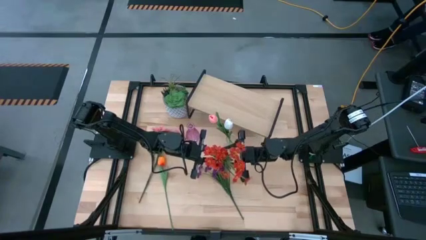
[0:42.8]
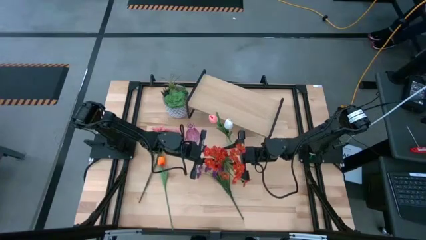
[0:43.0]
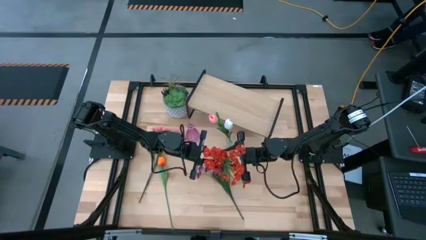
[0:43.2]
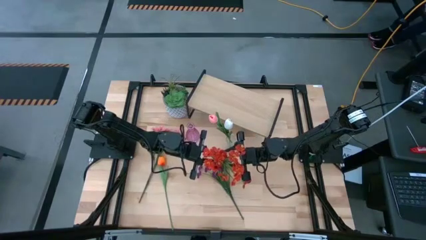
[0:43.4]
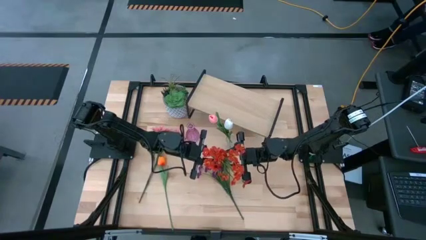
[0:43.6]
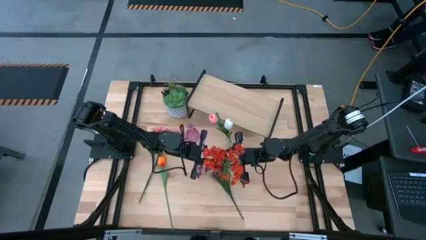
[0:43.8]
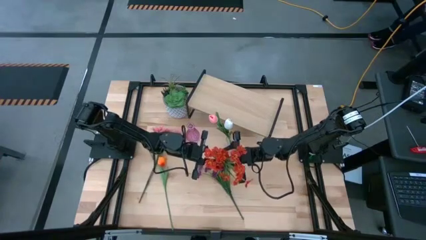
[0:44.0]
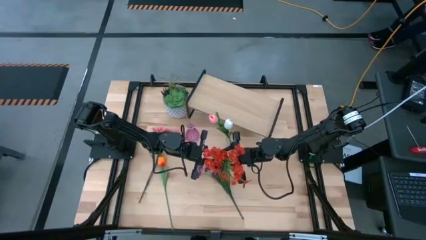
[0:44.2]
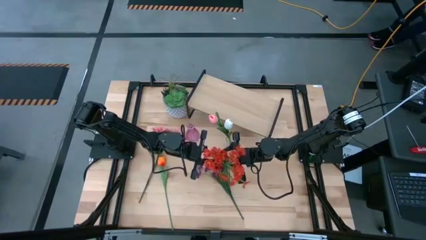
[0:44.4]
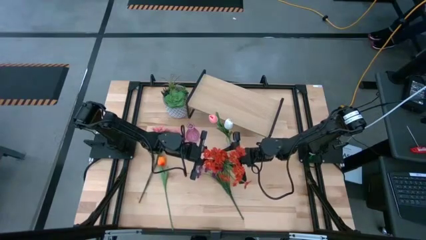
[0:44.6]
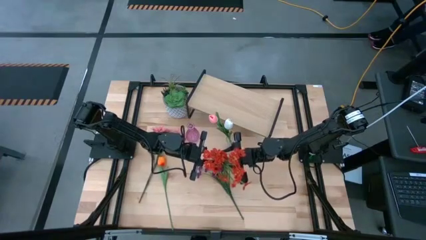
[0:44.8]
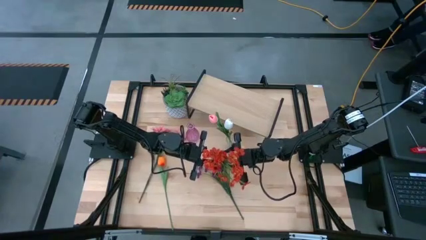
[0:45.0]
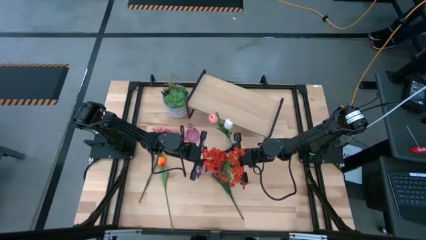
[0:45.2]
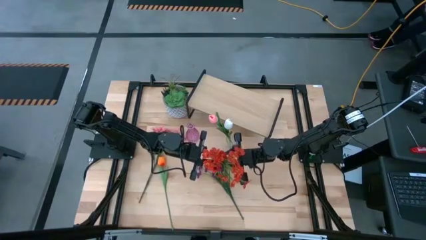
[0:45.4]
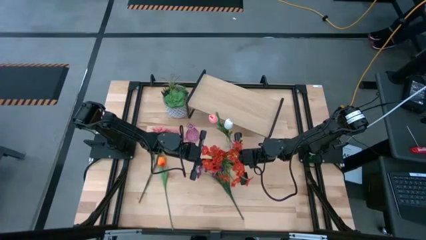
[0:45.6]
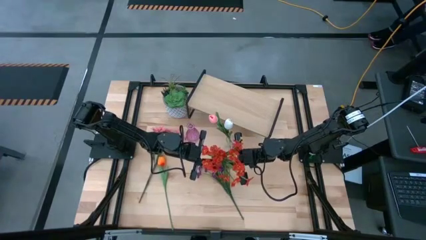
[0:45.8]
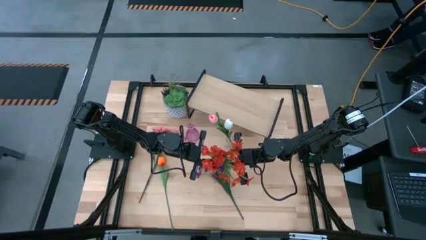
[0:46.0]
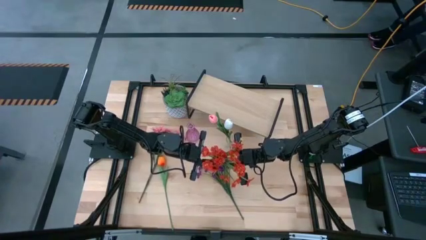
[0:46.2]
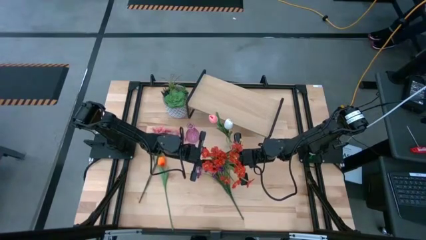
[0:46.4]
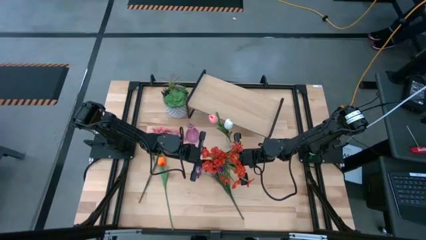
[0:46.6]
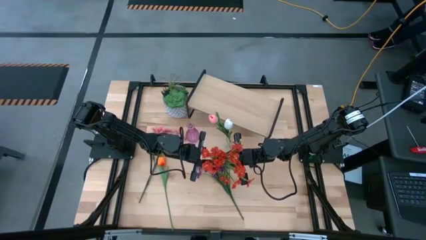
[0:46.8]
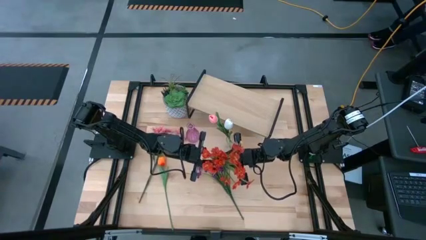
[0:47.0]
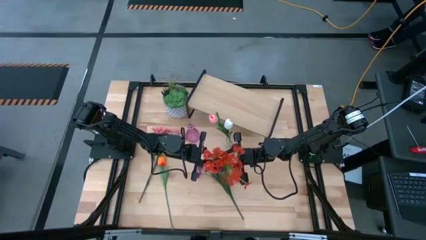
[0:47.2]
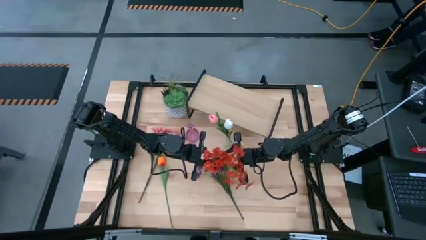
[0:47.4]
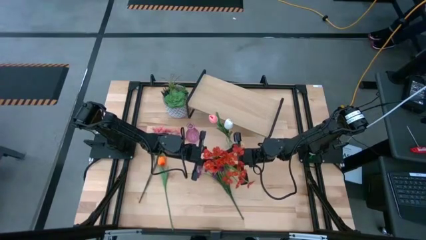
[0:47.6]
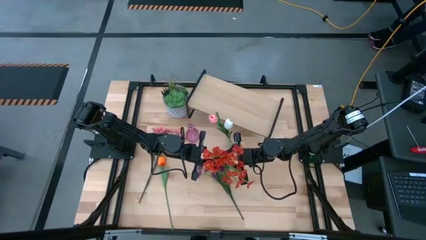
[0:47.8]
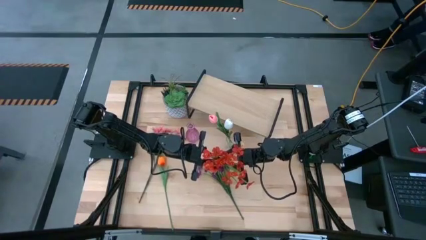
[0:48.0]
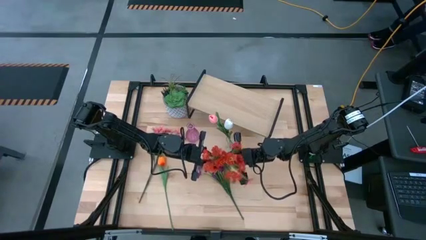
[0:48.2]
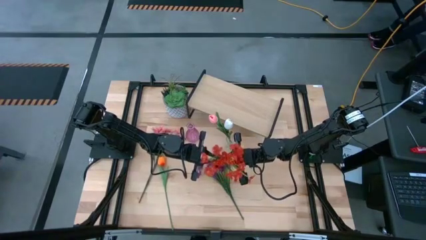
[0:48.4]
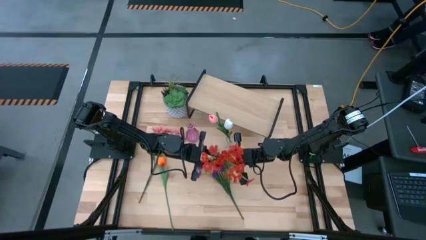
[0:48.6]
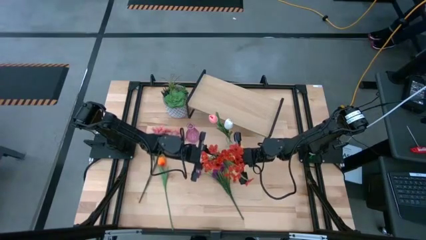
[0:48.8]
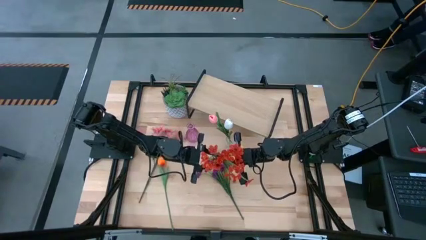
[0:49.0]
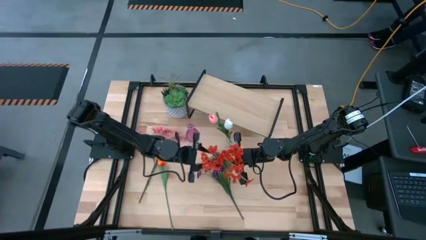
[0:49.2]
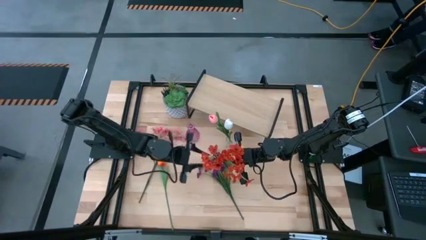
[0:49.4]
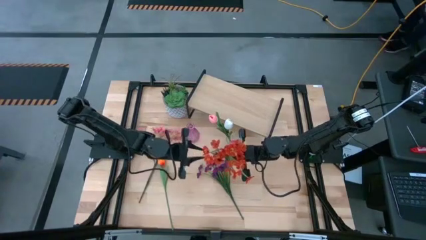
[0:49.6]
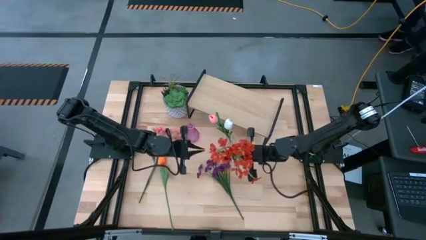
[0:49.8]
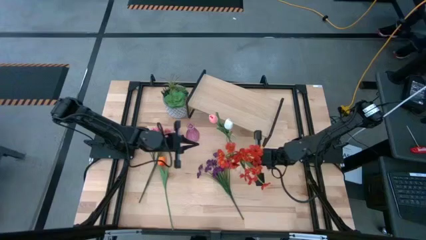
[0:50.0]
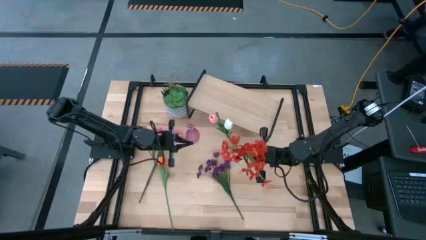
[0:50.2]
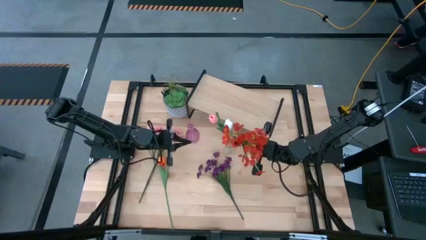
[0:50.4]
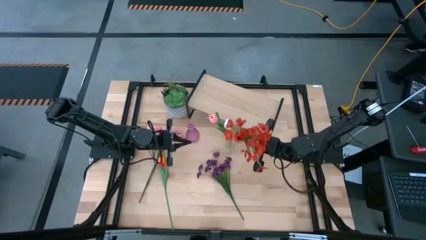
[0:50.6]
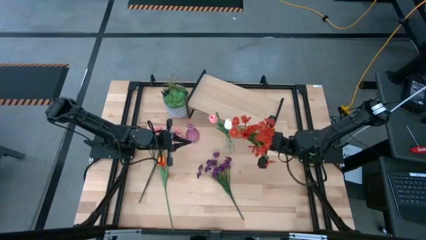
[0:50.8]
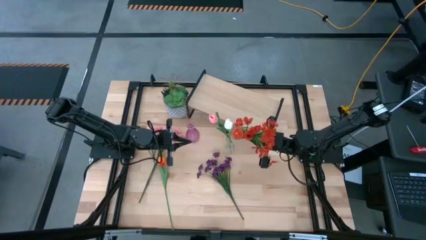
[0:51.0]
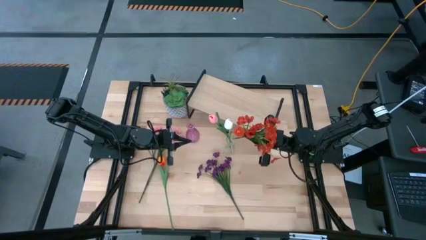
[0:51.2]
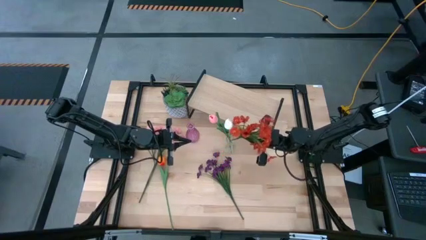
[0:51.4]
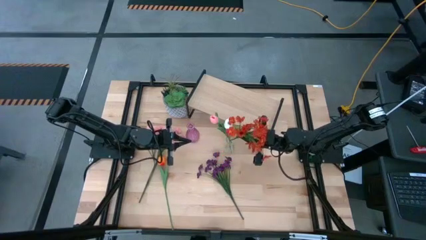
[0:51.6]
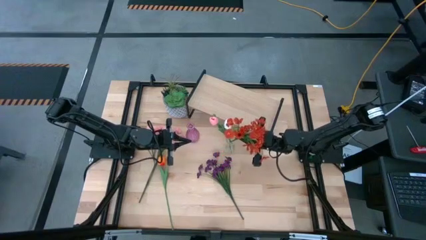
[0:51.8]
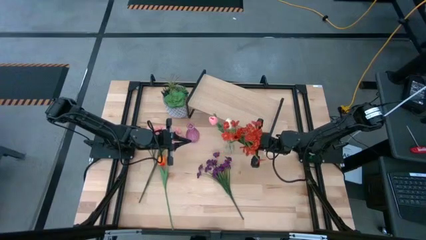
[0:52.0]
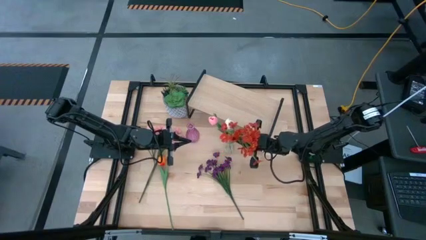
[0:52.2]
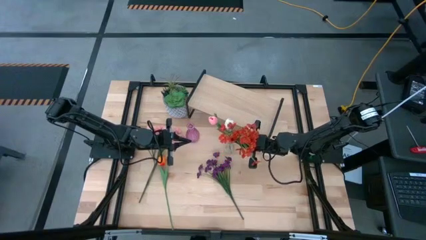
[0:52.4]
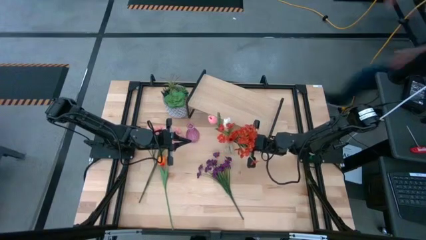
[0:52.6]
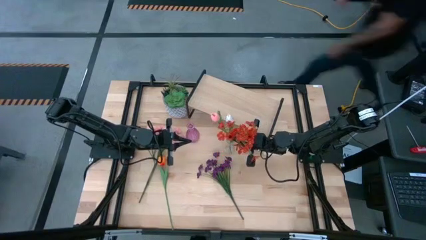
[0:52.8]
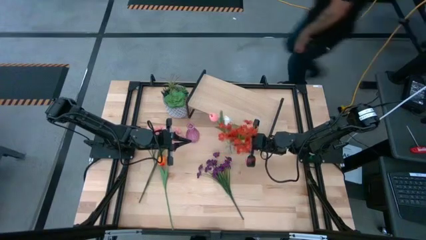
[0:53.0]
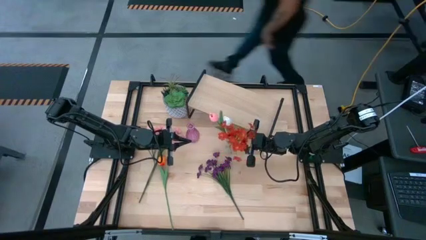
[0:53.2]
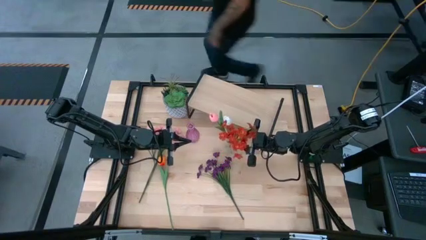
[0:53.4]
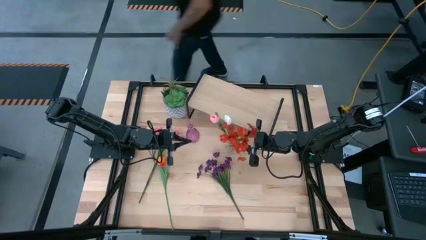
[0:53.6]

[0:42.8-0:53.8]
Task: Pick and place flowers into a vace then onto a shelf
Put the orange flowers into the transparent vase

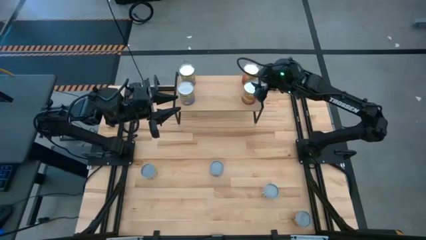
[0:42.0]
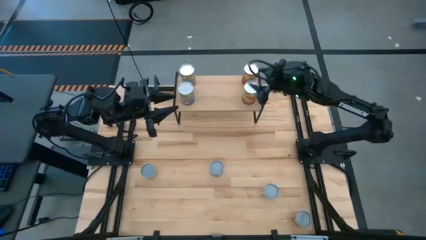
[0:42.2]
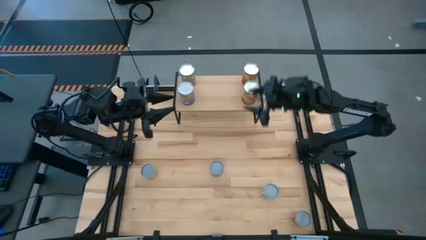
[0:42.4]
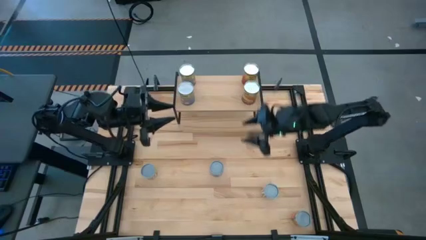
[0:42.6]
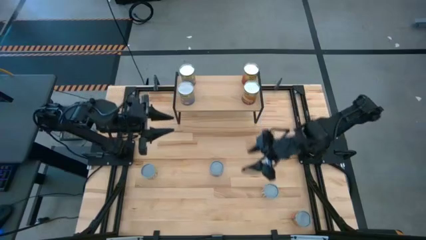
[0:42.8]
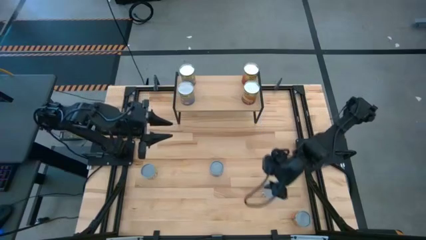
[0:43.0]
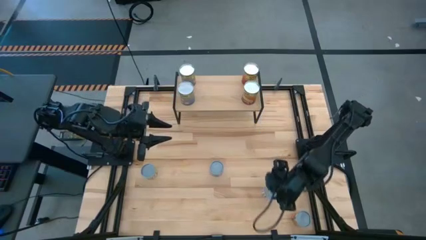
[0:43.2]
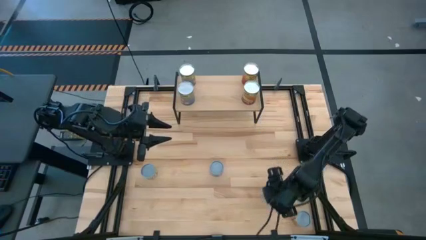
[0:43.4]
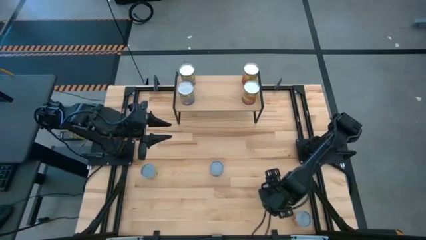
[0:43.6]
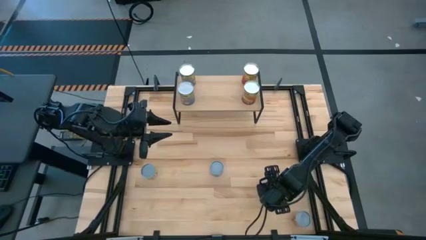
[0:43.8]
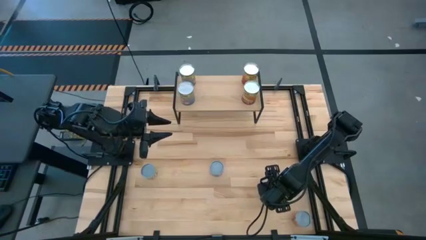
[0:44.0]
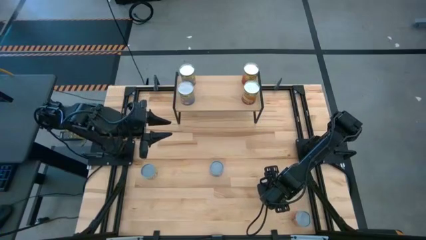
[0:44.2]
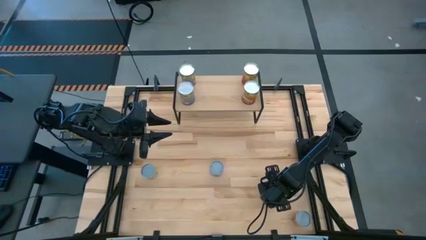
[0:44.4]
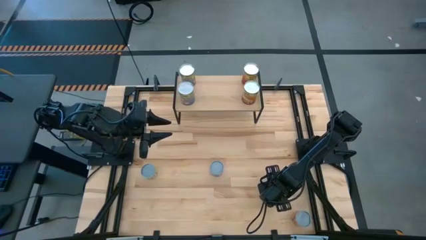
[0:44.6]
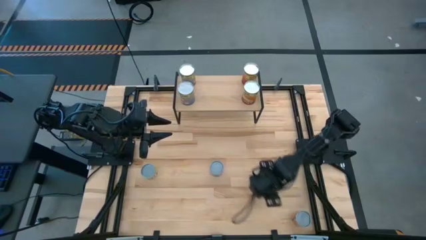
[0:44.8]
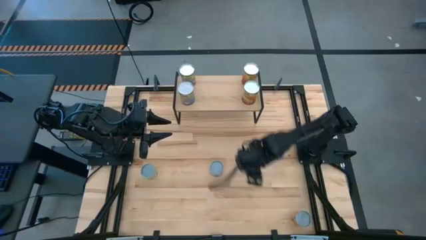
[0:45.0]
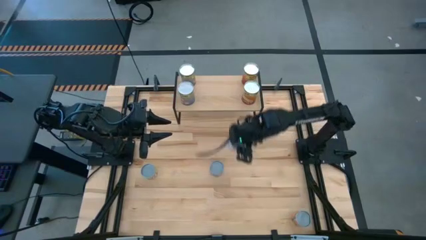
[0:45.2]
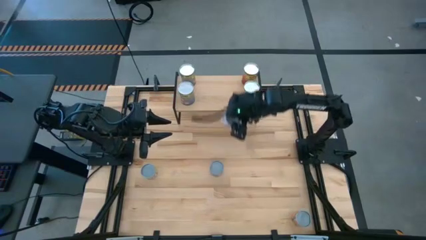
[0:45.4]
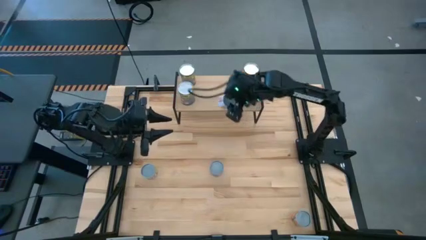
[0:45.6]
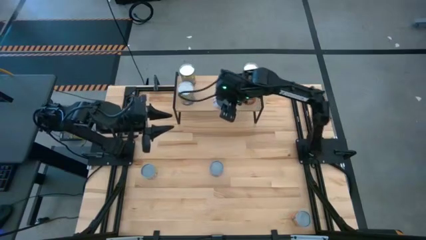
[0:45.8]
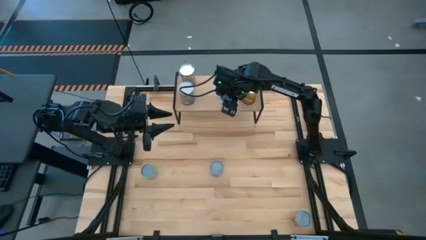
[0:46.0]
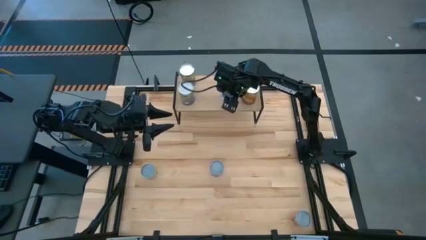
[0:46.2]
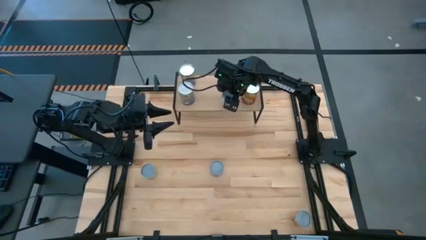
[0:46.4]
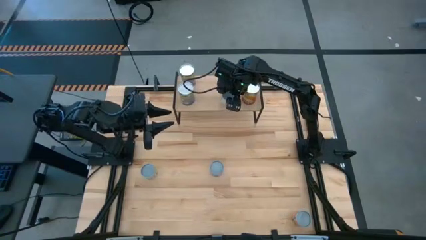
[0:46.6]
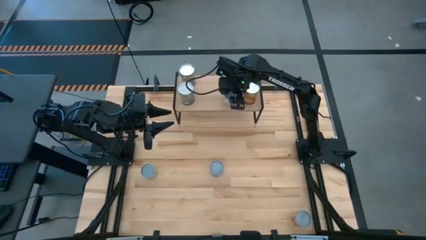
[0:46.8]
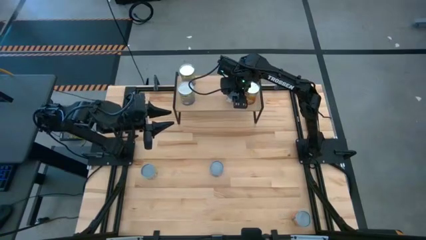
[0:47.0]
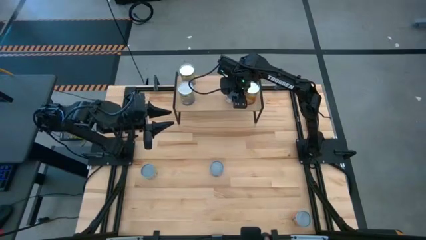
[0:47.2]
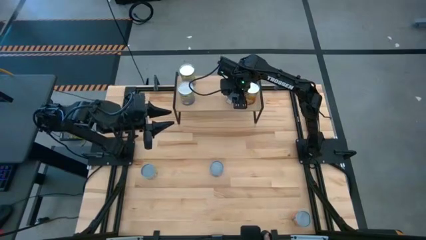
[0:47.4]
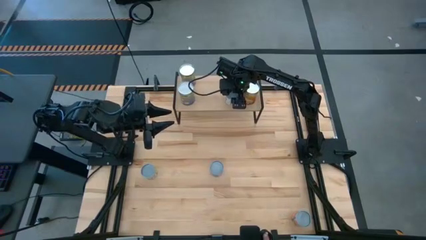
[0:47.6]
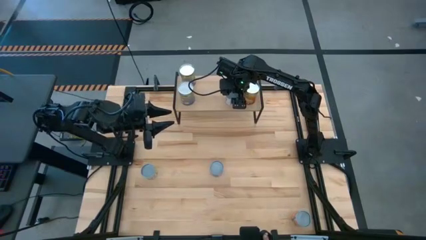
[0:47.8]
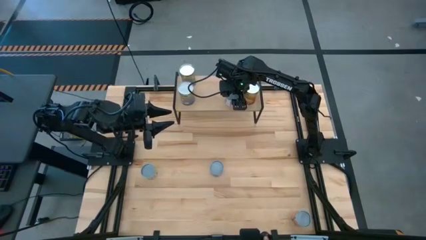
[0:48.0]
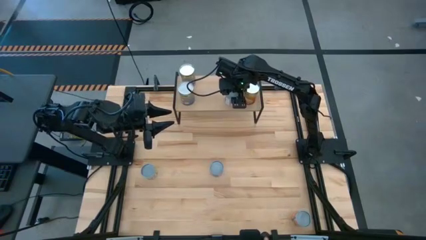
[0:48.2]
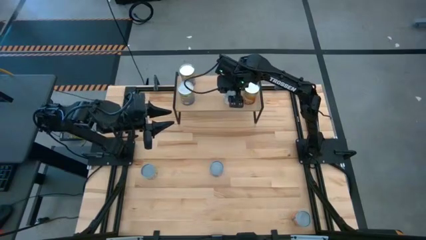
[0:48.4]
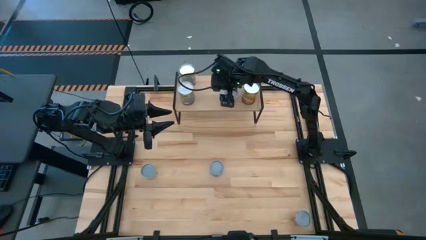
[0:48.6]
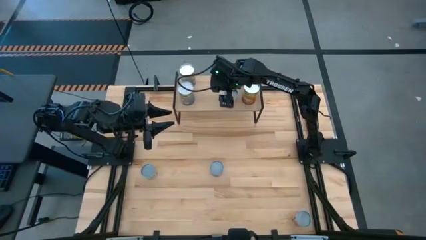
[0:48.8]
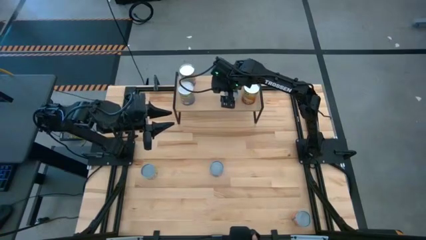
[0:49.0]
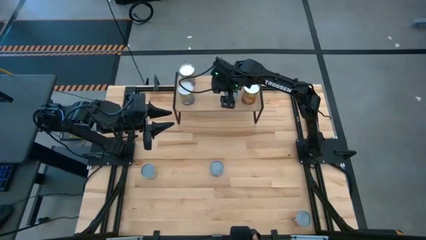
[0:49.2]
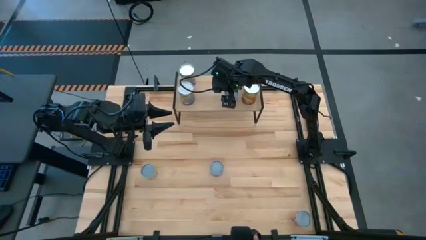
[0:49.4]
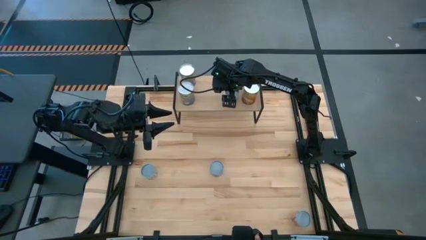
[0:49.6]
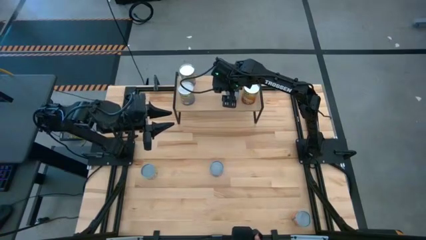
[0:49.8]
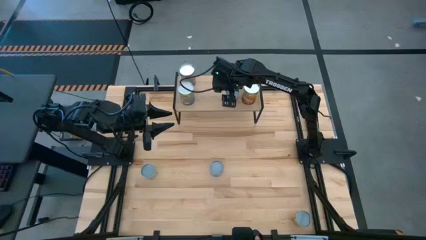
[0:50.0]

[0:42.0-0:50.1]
Task: Pick and place cans onto a shelf
Put the canned carrot on the shelf
